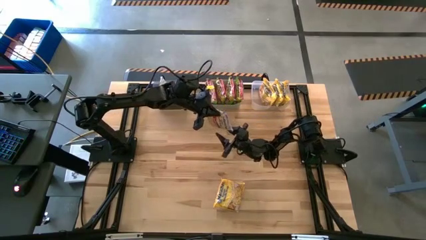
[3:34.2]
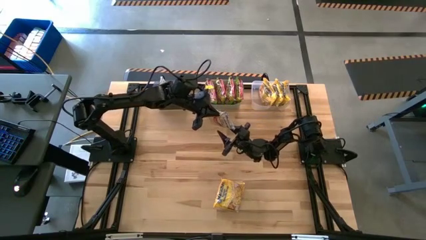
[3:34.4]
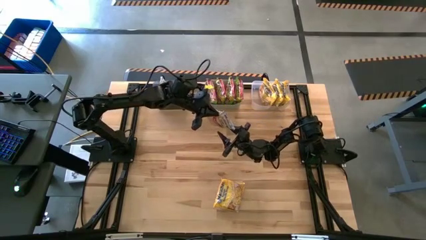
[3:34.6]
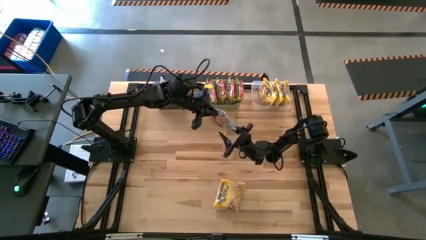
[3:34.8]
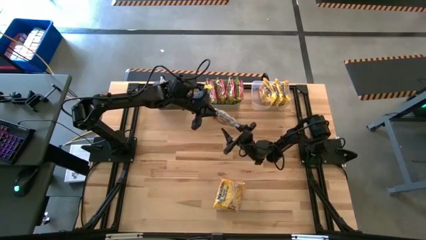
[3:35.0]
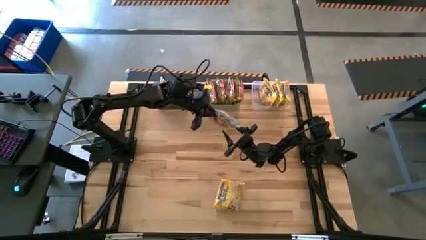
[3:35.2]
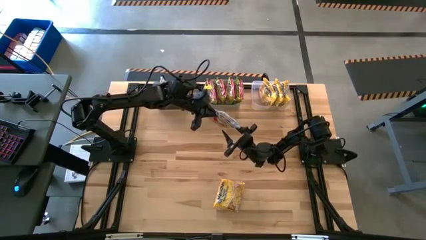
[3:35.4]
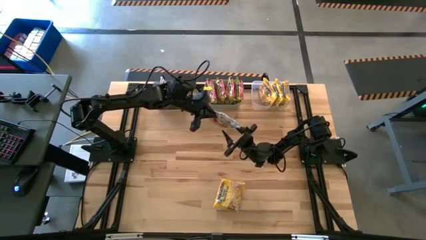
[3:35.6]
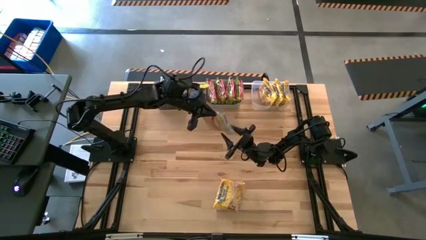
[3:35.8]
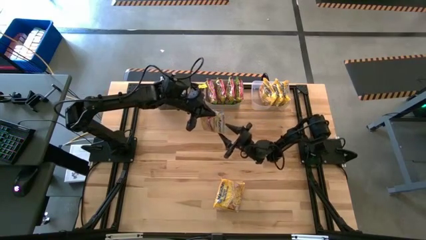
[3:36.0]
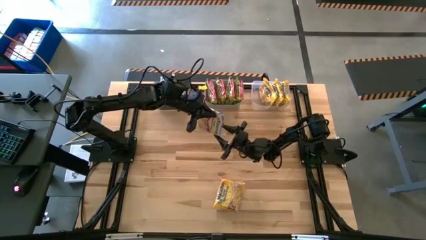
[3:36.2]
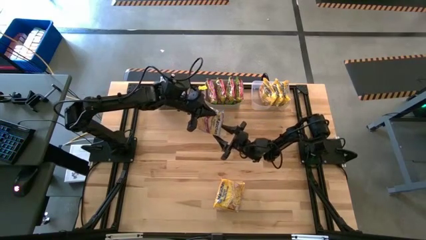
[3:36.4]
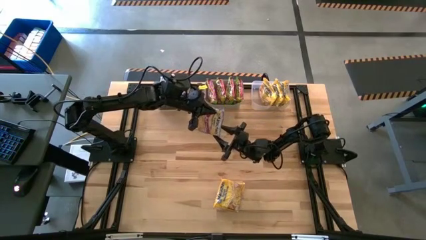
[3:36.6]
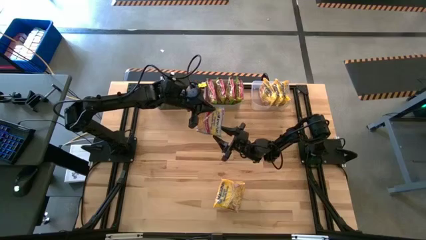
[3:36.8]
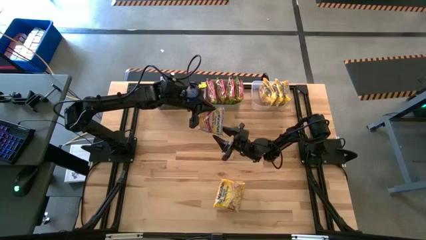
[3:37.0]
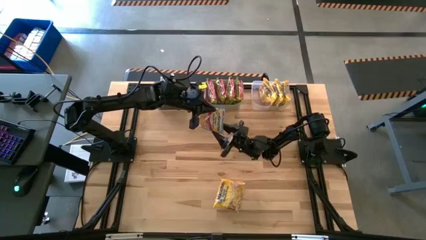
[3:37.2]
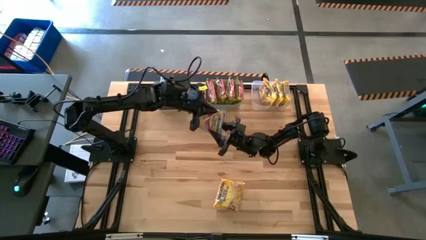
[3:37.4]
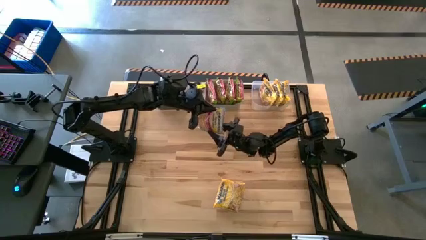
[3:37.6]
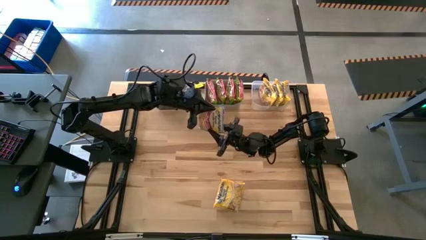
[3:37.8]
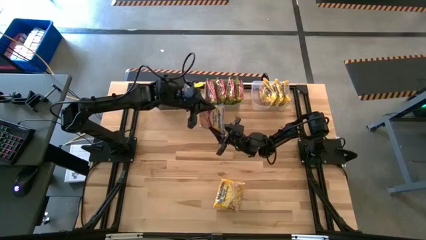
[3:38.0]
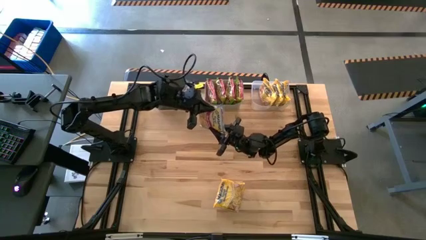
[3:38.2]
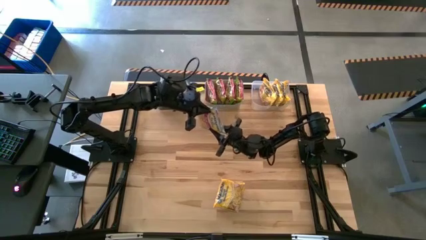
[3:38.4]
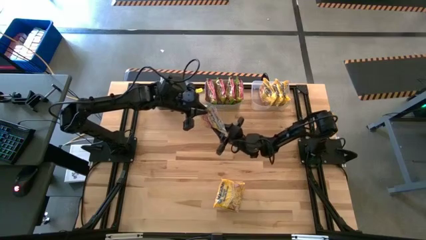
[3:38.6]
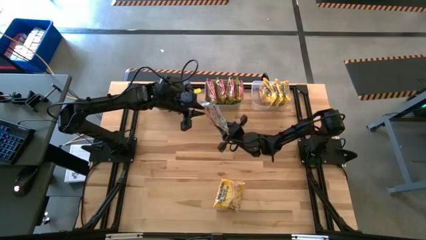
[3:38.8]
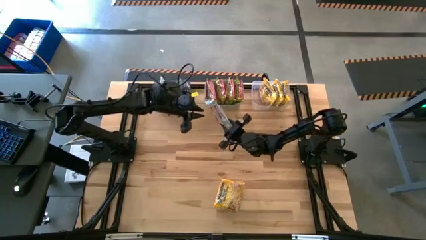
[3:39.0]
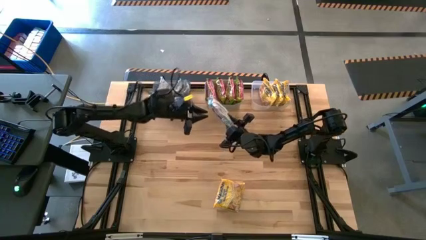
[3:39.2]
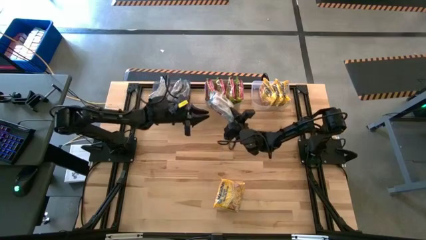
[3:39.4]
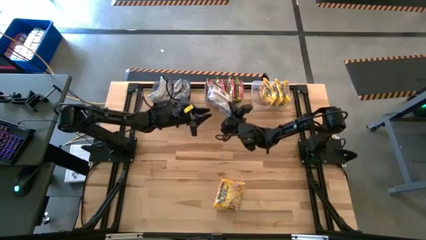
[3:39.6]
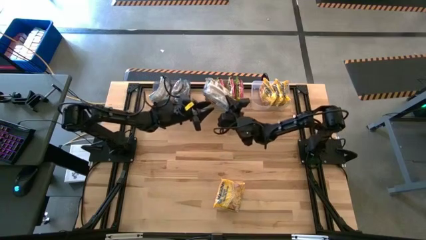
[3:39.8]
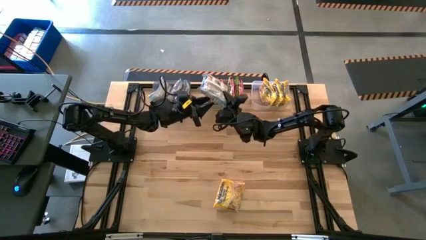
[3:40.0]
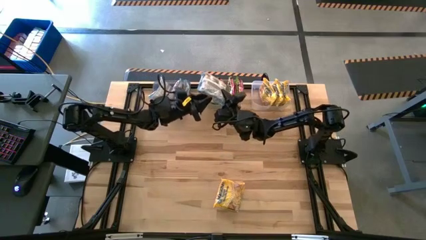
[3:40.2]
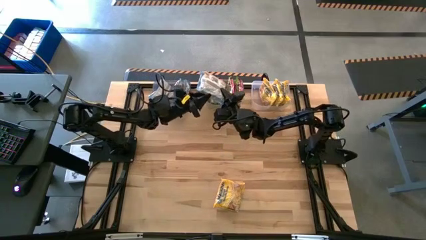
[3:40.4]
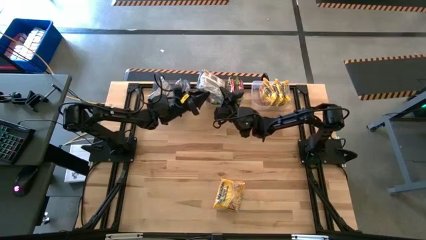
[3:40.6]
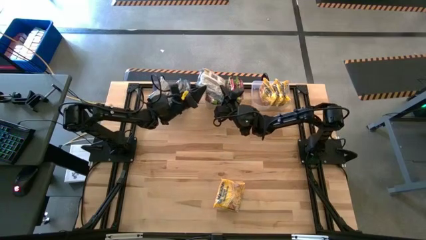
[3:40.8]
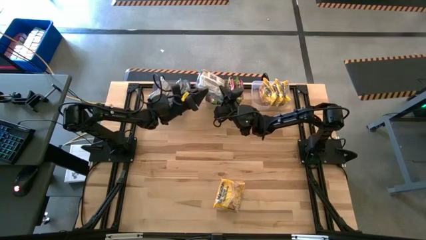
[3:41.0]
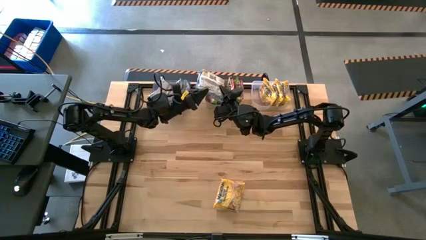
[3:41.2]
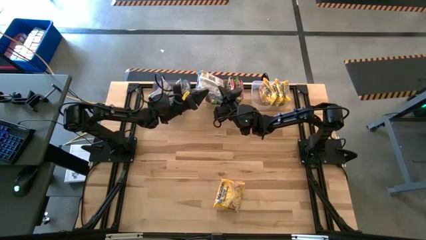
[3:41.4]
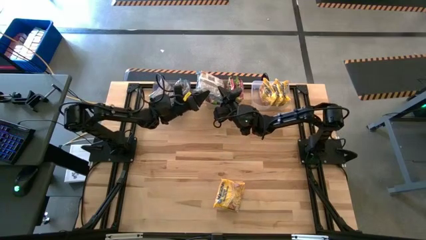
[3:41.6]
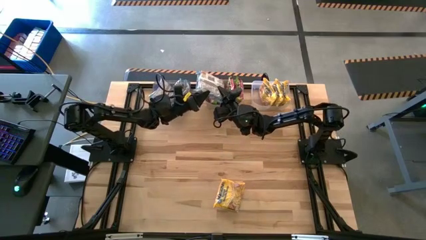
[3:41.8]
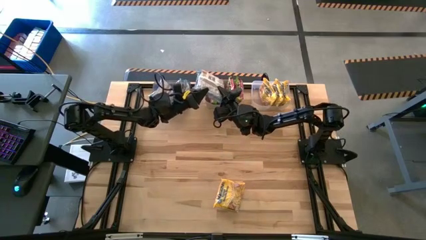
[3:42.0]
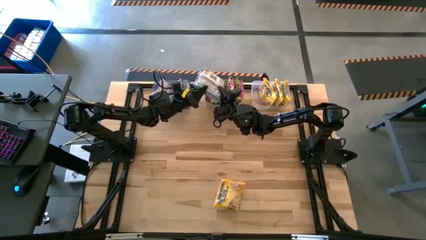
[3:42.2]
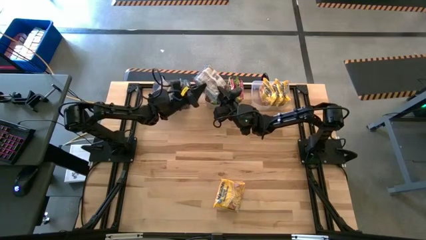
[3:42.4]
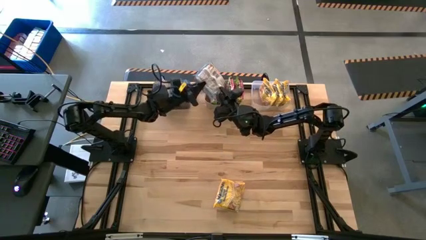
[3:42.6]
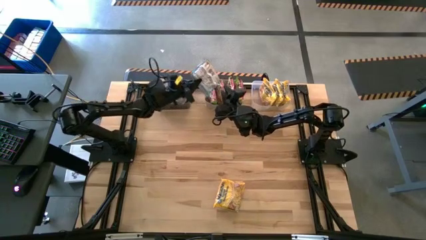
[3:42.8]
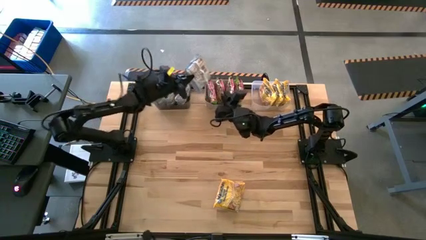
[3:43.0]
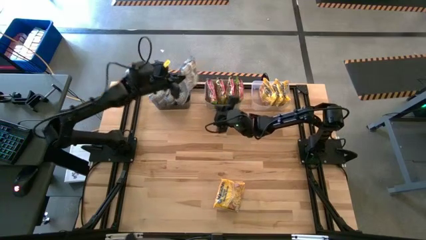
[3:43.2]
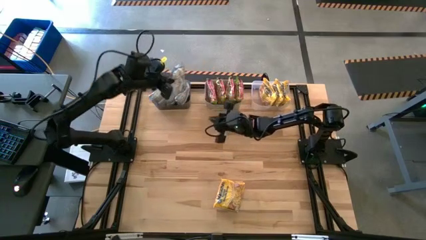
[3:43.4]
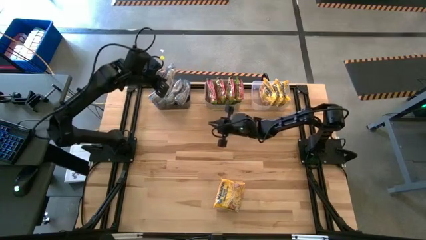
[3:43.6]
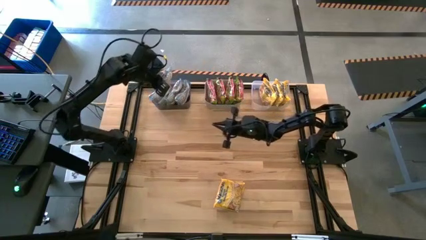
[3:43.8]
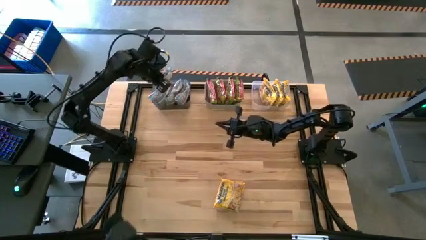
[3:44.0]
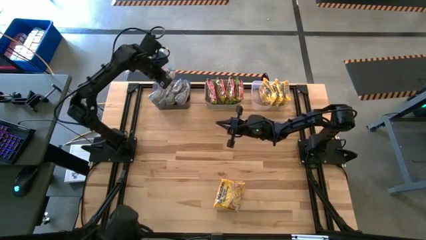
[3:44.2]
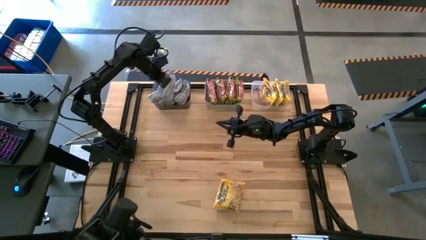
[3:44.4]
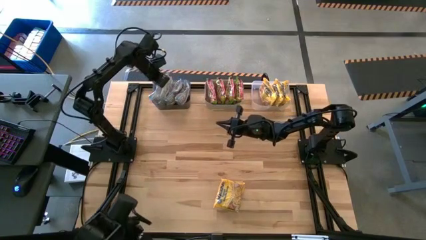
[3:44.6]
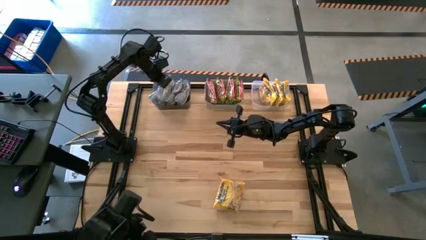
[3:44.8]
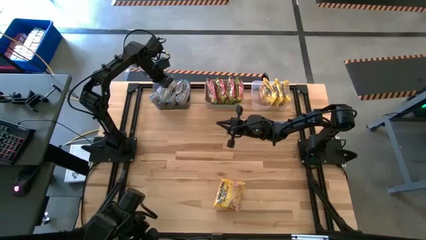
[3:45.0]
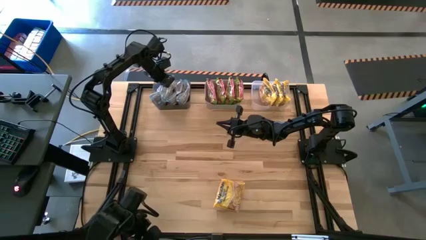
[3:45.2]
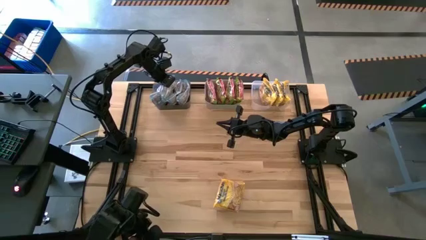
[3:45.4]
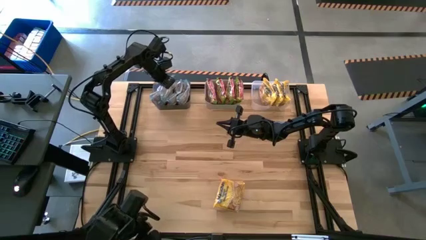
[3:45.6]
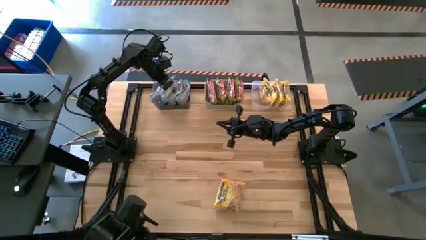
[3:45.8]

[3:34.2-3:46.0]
Task: Sort Maruchan noodles
Put the blue noodle pack into the black bin

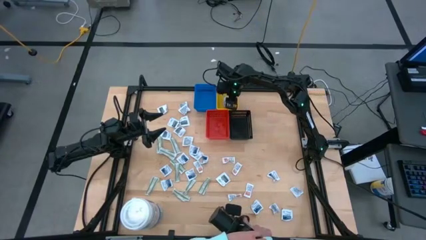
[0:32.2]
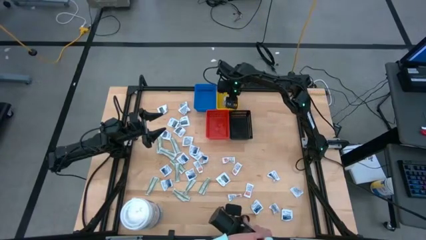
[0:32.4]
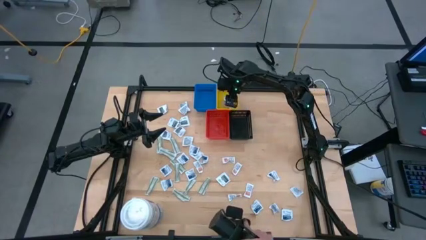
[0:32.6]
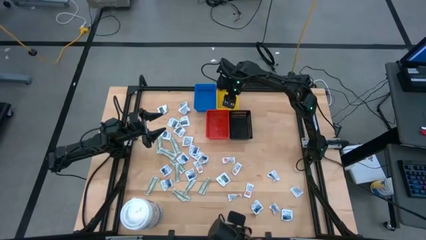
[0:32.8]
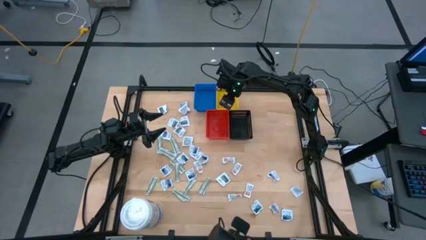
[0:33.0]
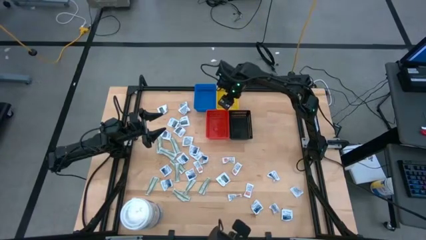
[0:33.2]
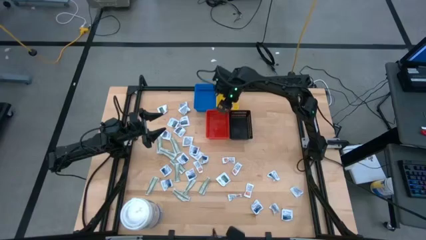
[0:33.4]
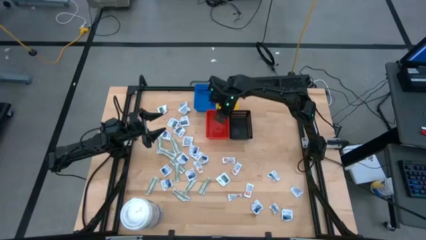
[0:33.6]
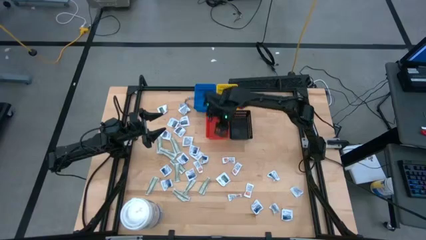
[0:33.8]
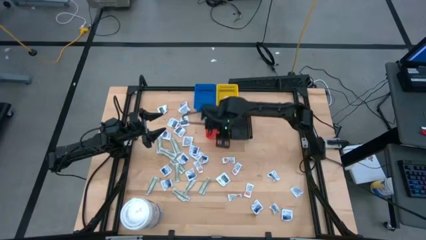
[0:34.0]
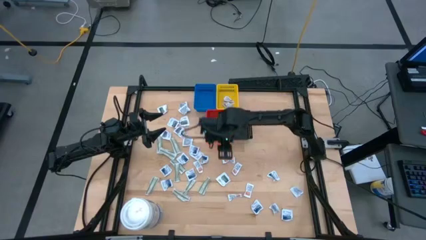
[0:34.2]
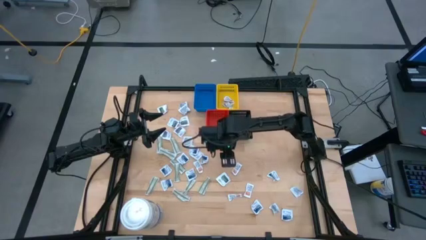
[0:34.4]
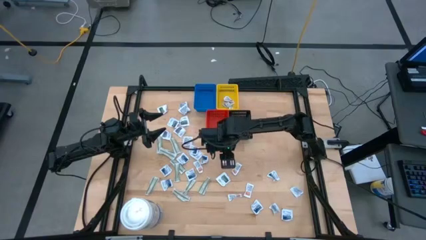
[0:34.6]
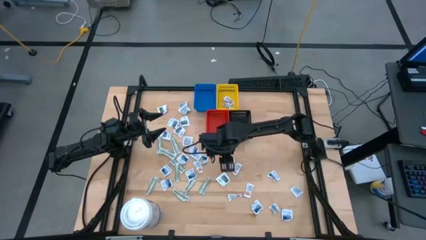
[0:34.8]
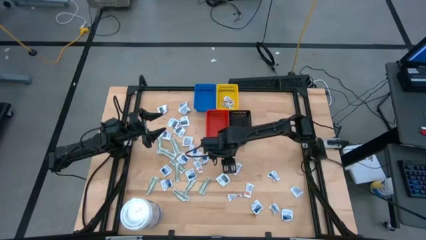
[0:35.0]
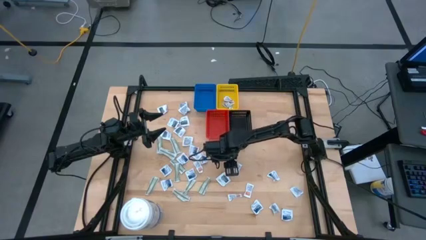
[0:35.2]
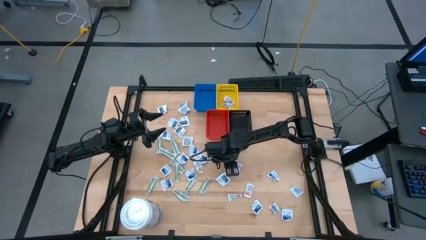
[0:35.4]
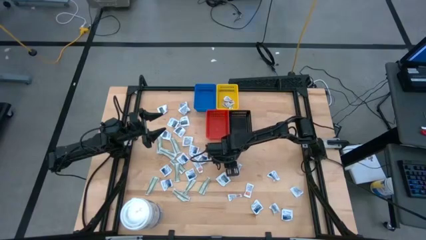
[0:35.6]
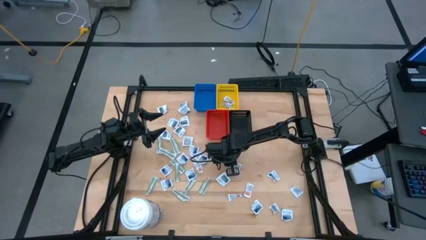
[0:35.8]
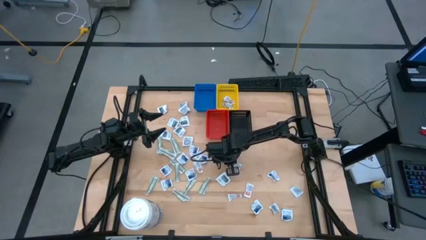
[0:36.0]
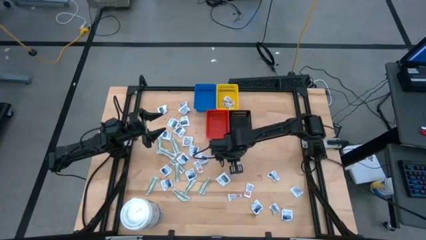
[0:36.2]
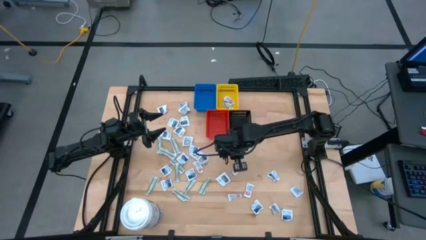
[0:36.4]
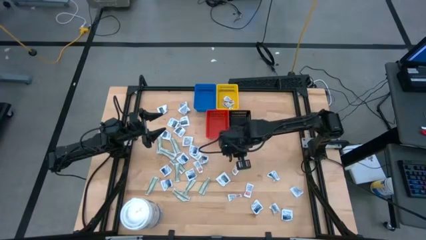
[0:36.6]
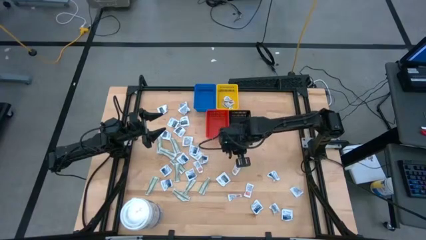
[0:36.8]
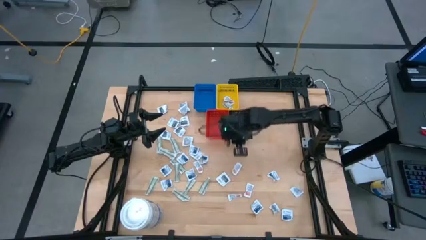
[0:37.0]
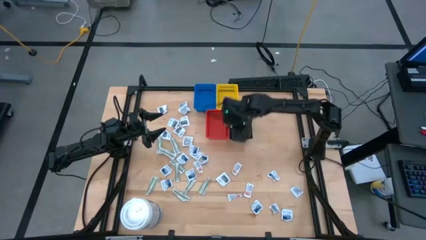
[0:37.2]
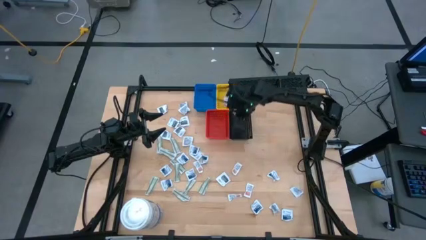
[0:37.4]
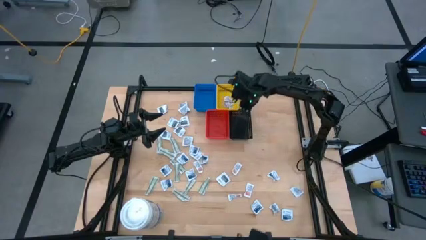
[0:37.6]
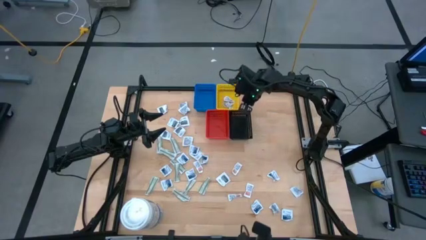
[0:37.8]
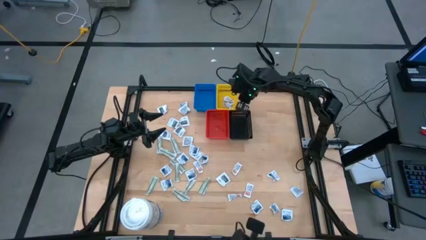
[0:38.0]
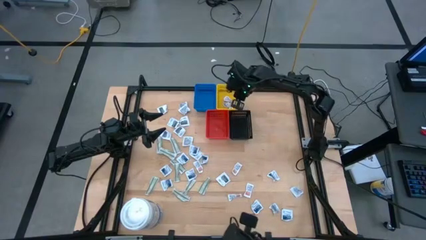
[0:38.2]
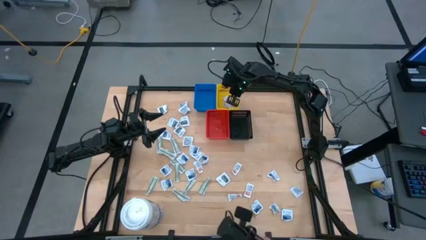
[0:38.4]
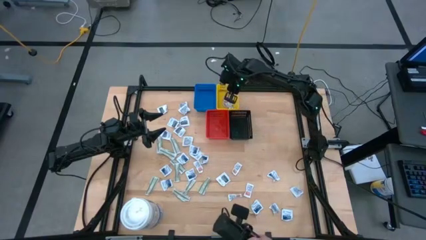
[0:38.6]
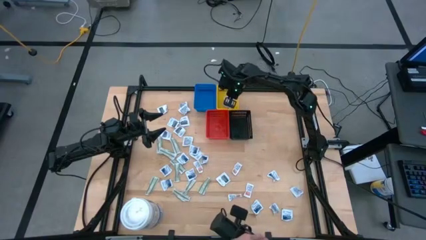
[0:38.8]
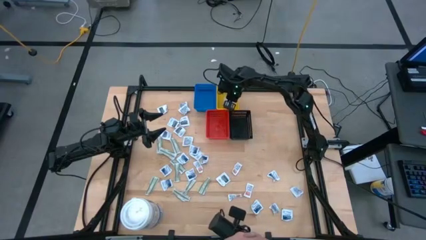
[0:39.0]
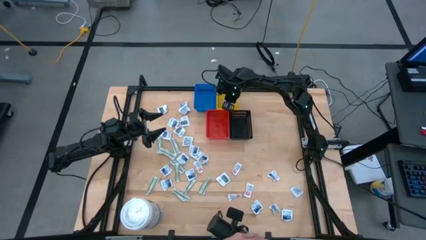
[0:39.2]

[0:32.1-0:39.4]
Task: Pick & Place First Aid Supplies
Put the ointment pack into the yellow bin
